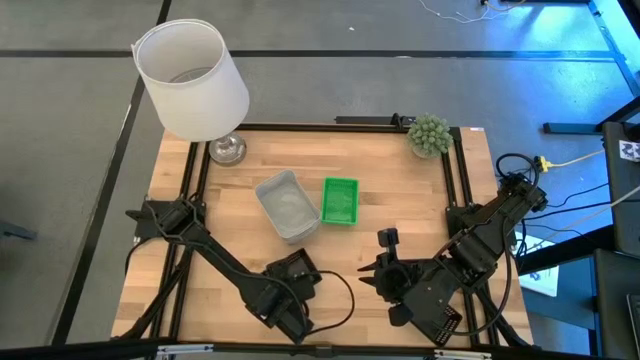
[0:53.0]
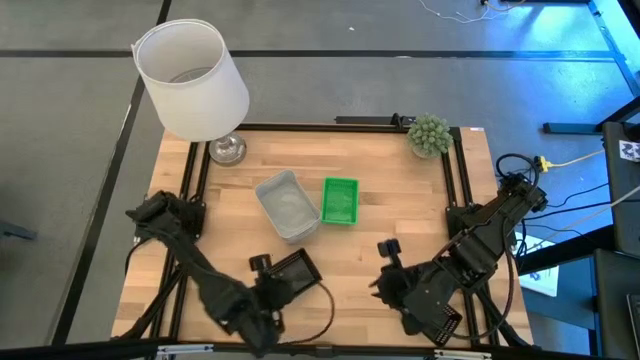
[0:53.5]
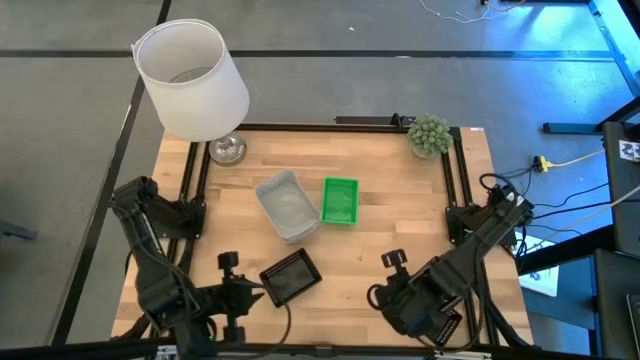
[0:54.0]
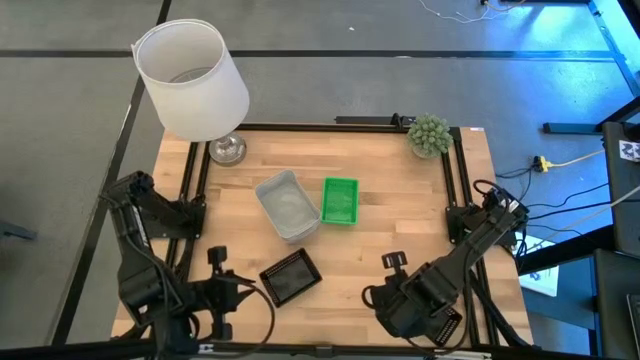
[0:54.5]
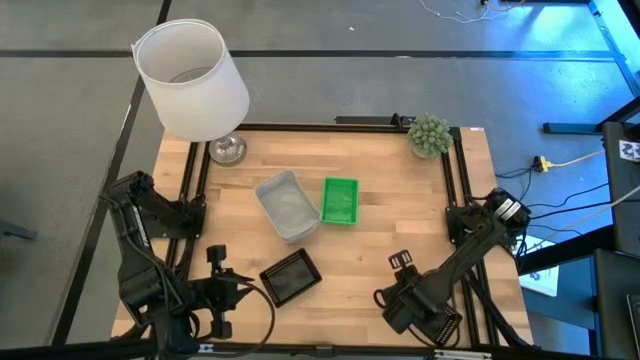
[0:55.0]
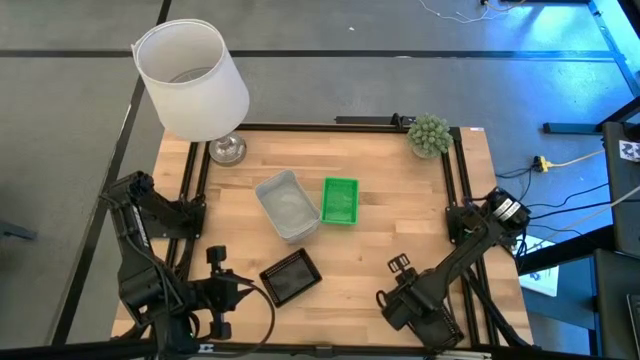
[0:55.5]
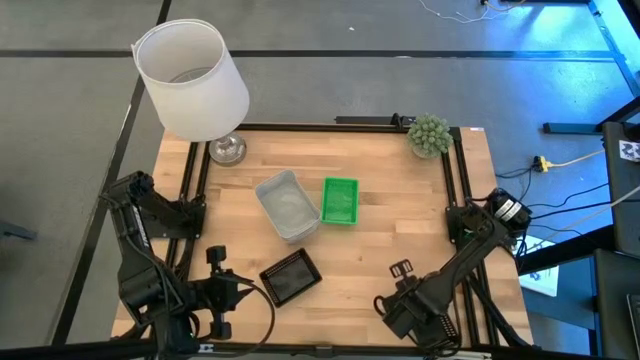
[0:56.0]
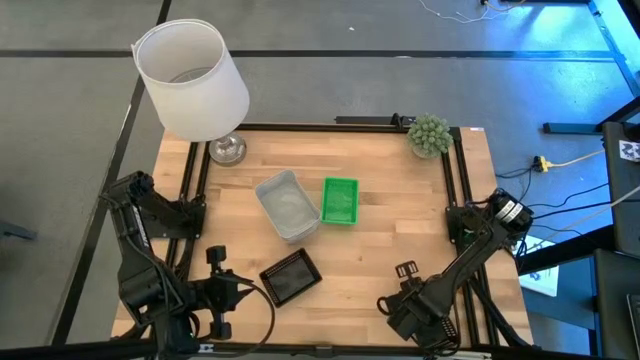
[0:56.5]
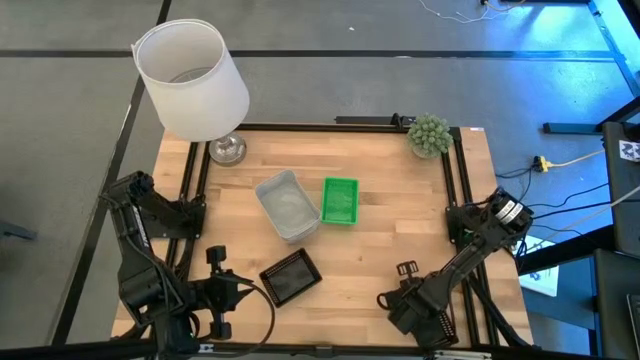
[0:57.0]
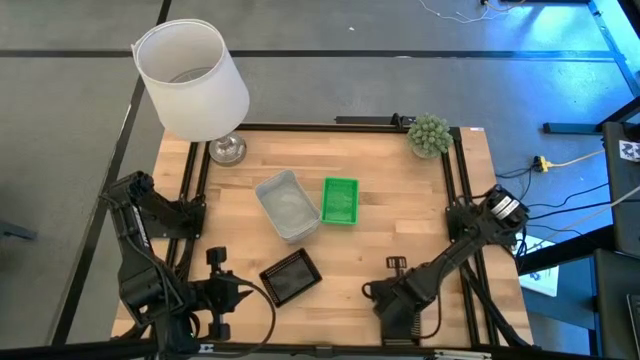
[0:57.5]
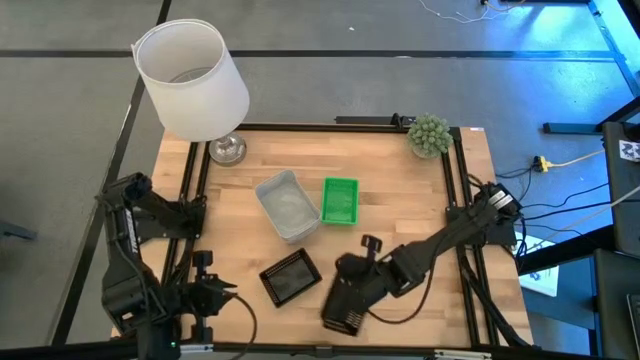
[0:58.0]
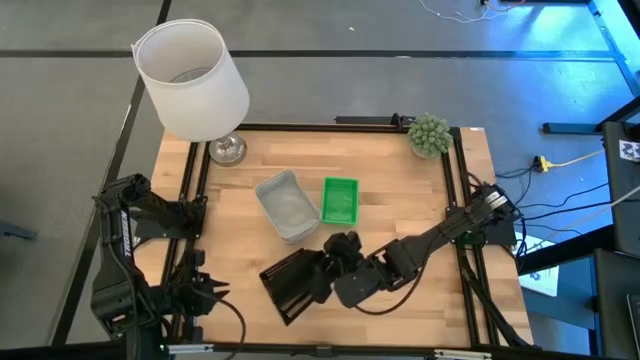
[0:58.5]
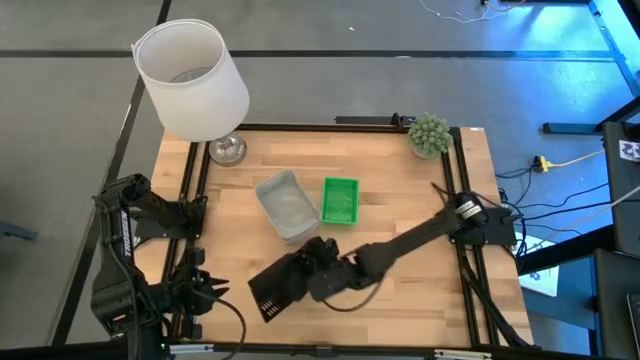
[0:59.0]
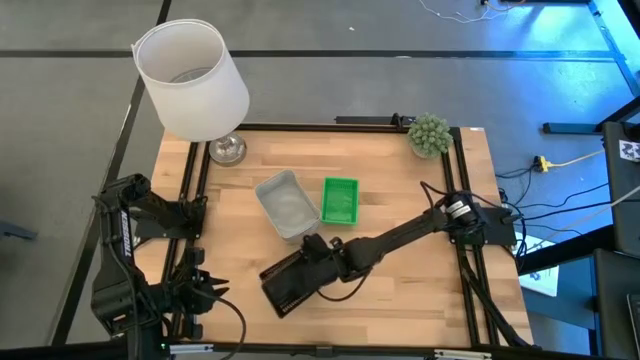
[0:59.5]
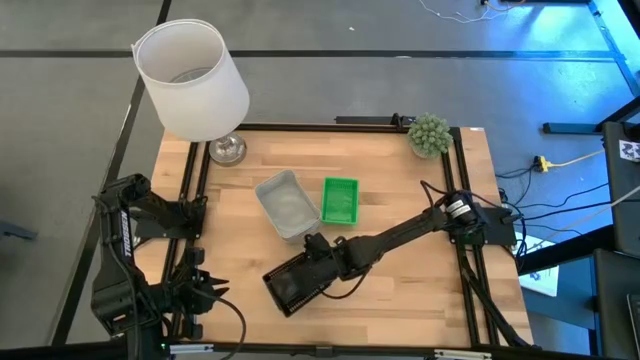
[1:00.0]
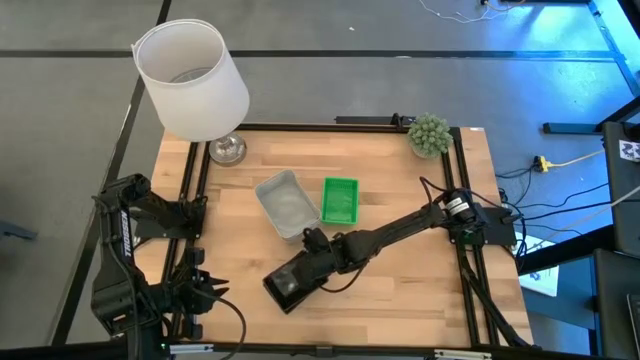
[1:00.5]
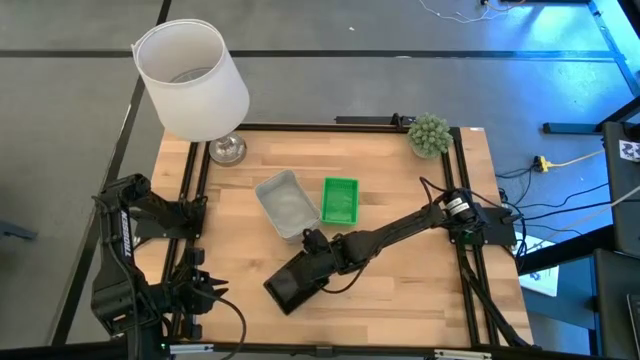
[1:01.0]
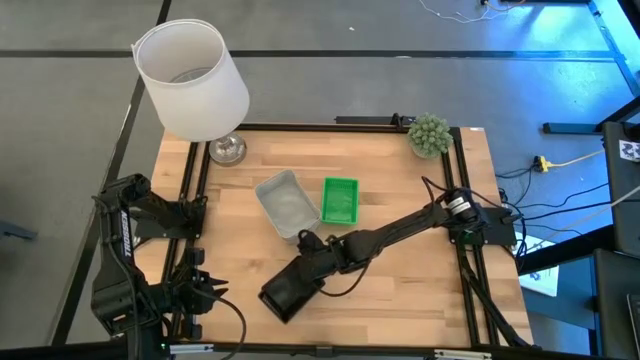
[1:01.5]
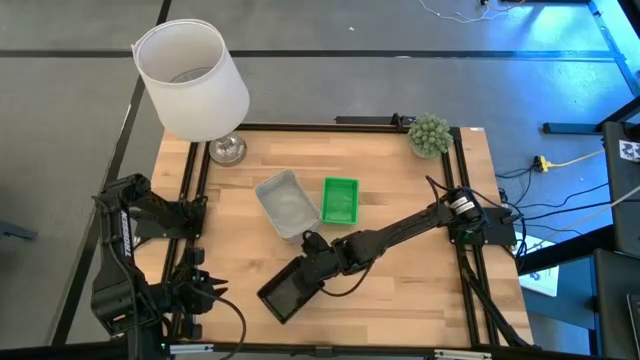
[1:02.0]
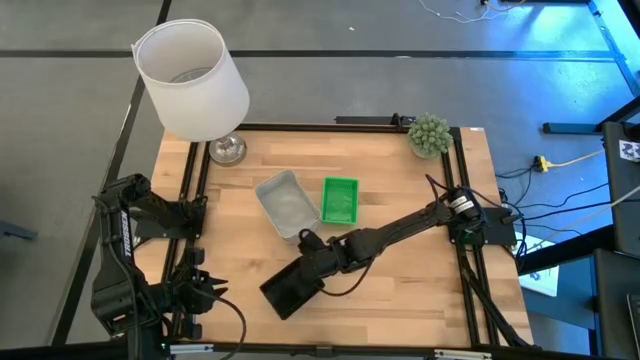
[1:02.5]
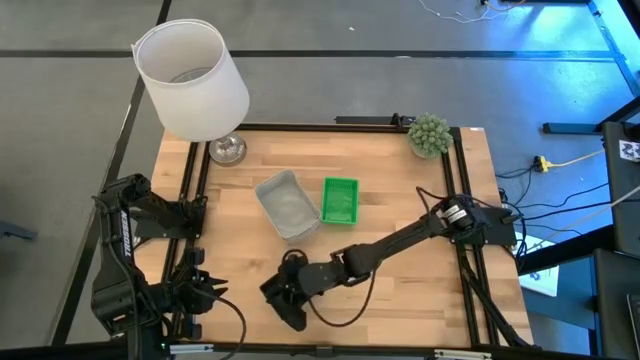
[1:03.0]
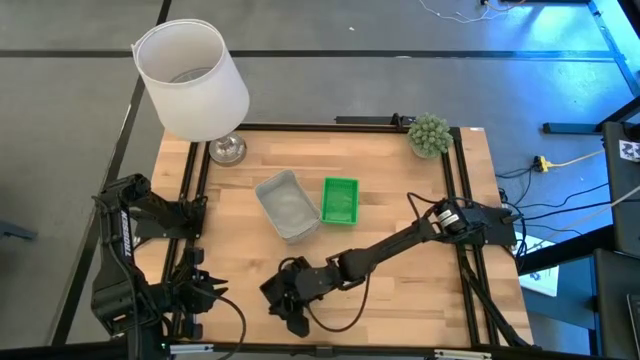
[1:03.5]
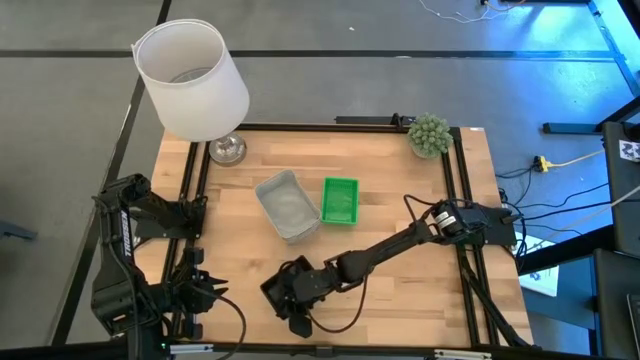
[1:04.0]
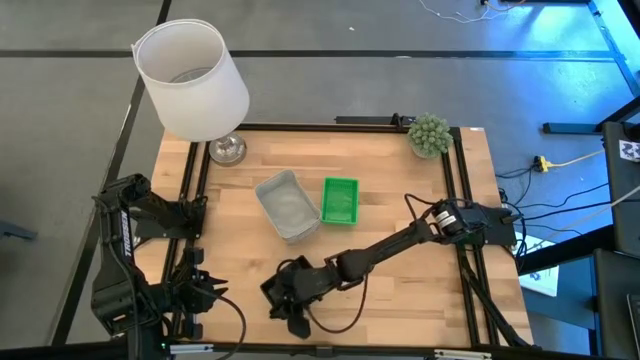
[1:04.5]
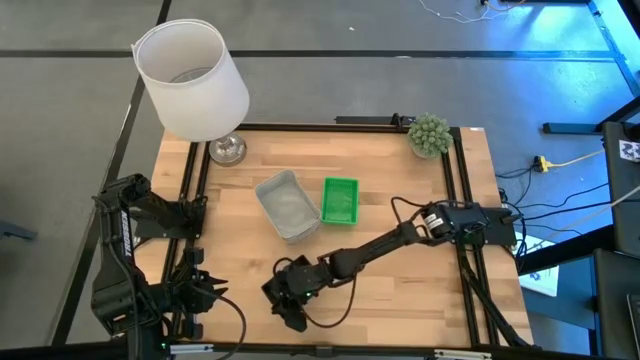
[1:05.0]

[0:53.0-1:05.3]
Stack the right black bin into the left black bin

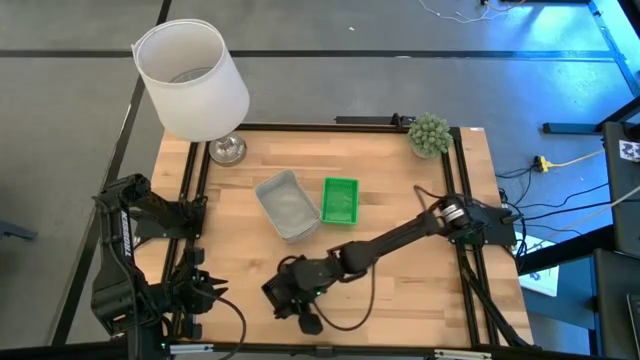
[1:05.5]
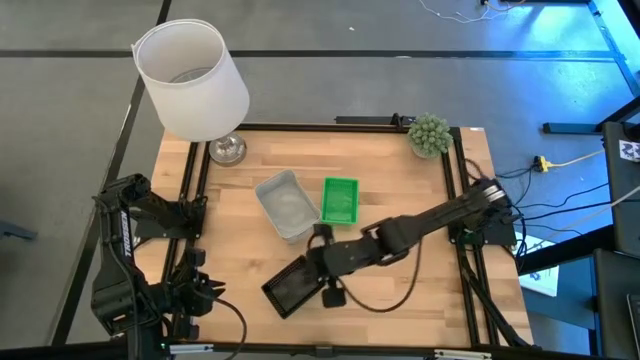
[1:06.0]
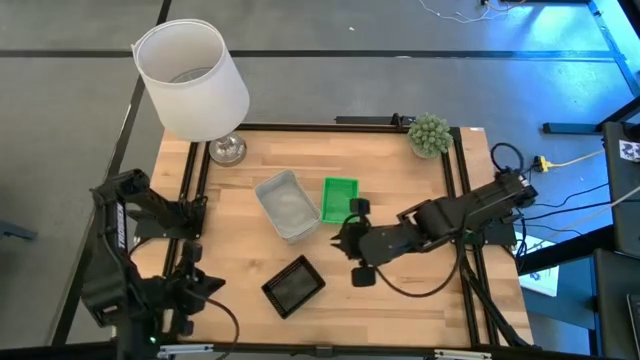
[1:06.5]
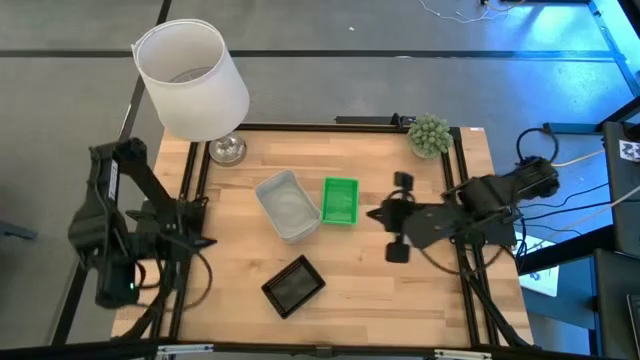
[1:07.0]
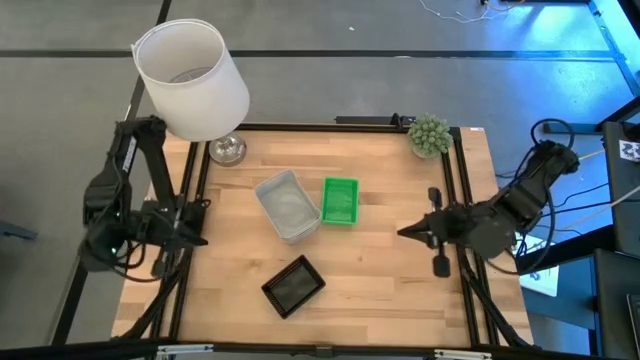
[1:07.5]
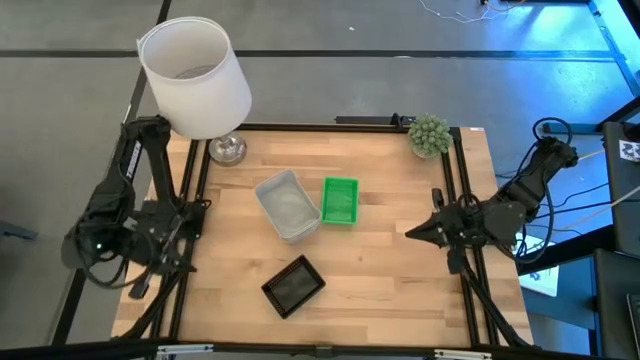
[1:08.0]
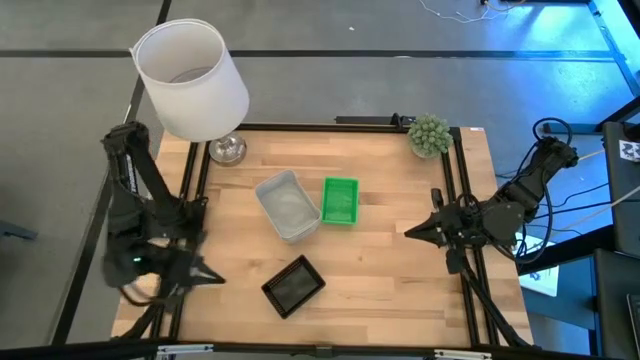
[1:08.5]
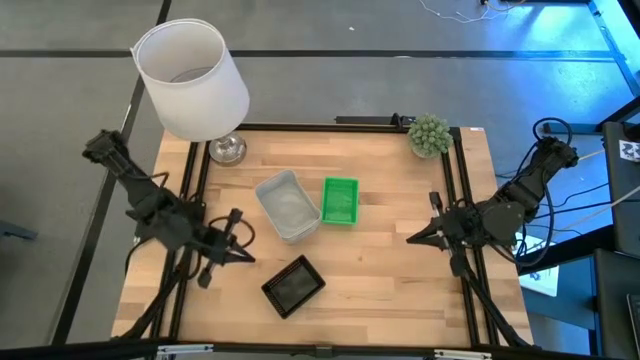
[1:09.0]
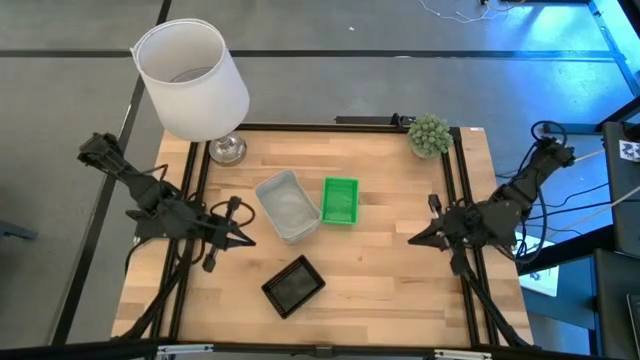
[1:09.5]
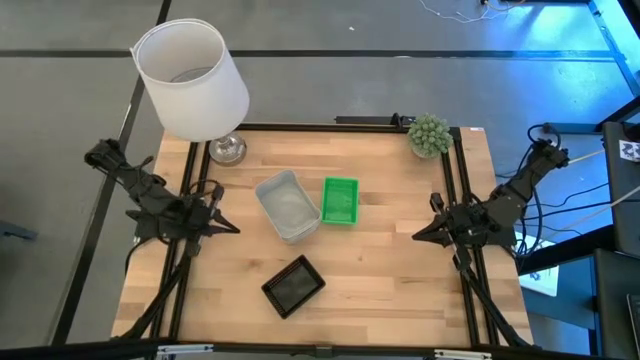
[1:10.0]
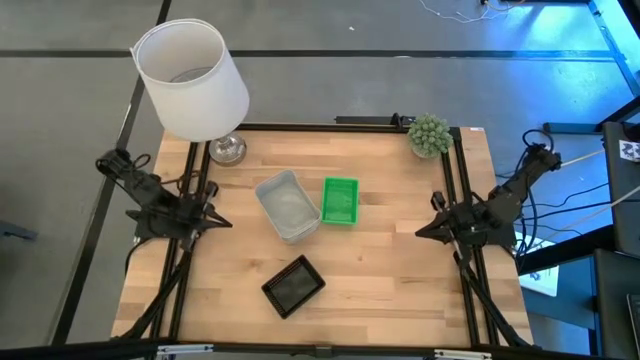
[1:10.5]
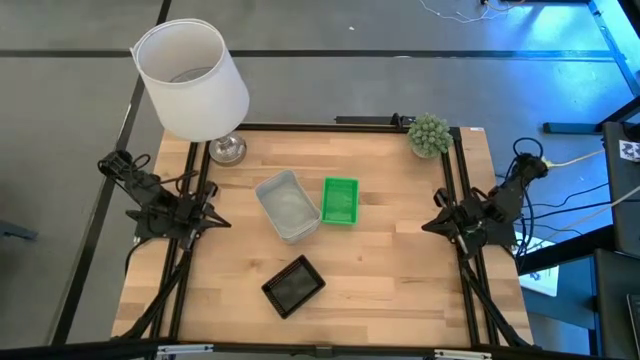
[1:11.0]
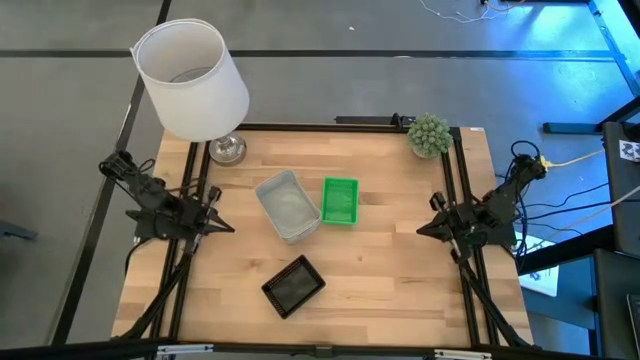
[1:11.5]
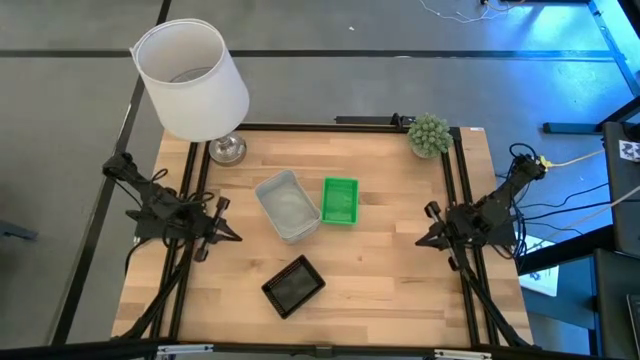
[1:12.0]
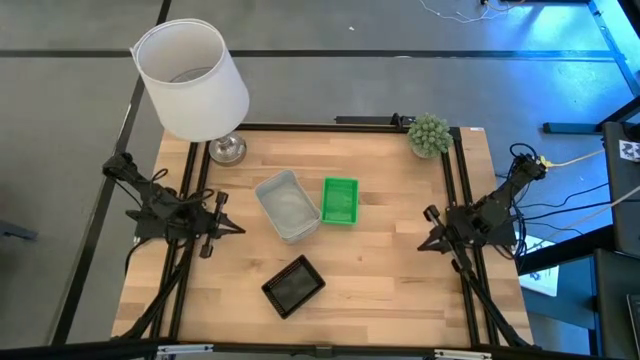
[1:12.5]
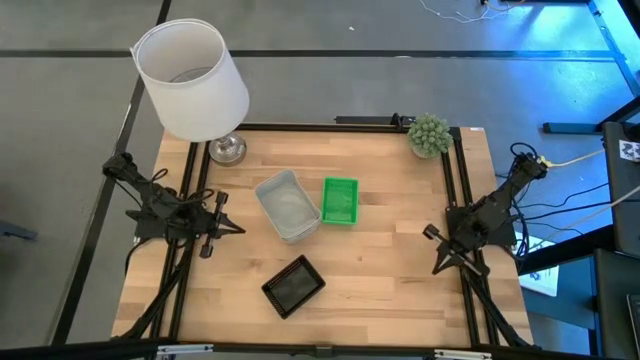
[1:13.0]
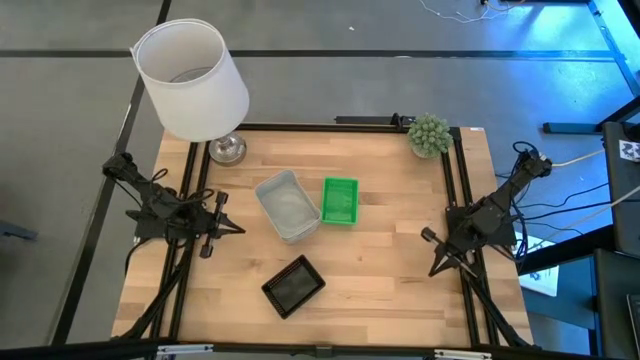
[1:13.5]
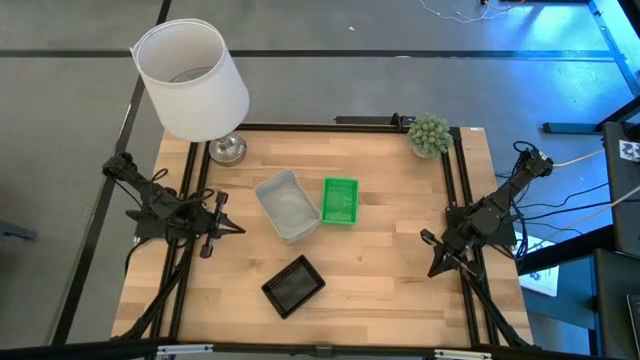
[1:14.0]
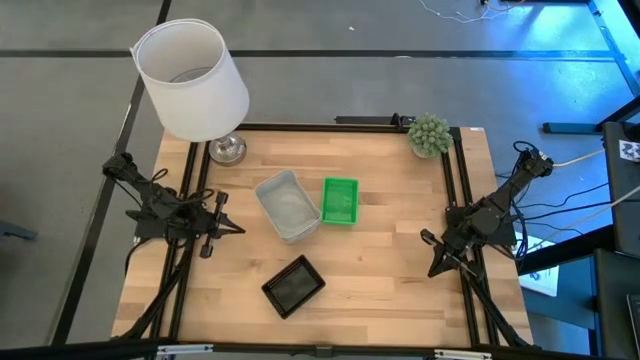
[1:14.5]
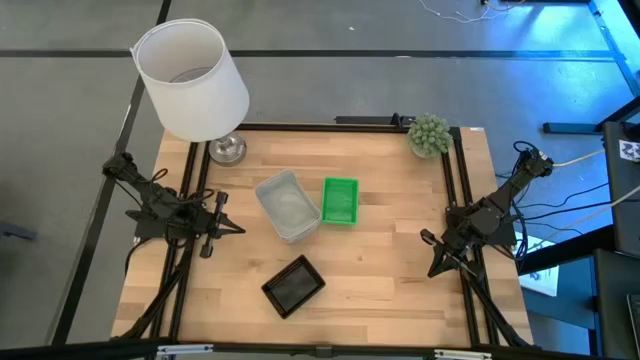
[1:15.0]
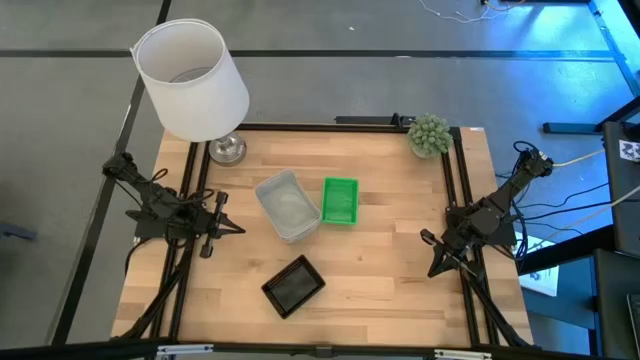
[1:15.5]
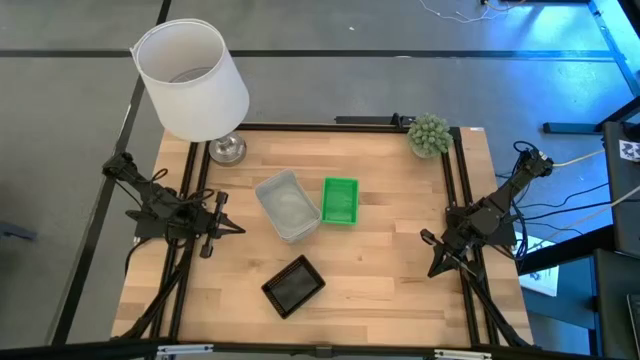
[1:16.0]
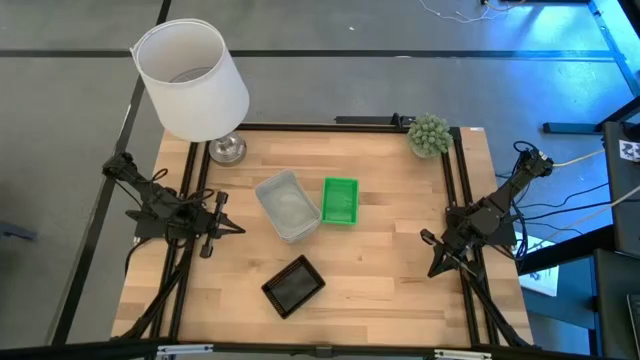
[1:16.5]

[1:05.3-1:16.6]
Return to Home Position
